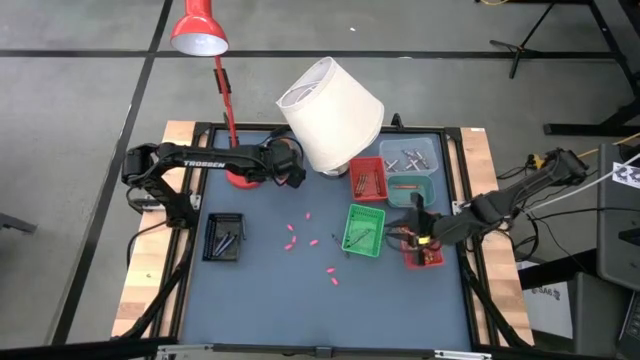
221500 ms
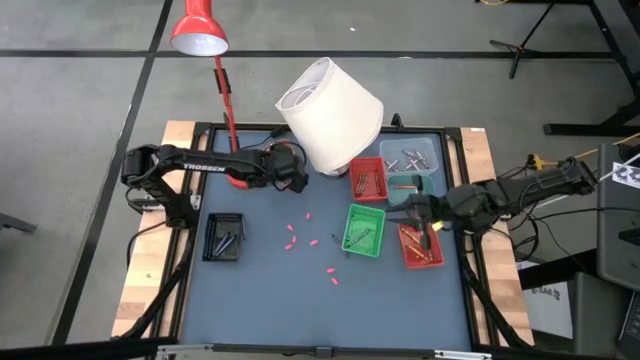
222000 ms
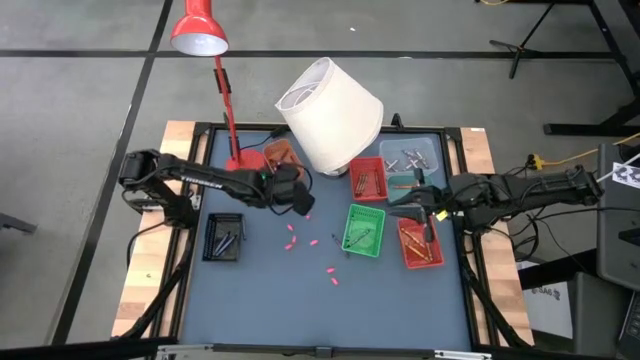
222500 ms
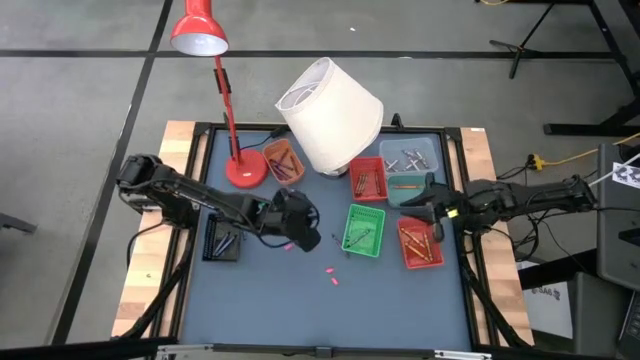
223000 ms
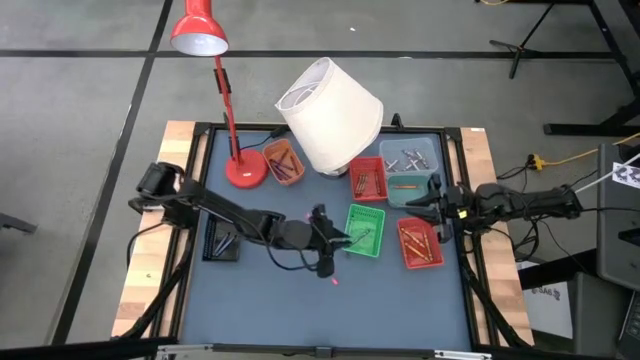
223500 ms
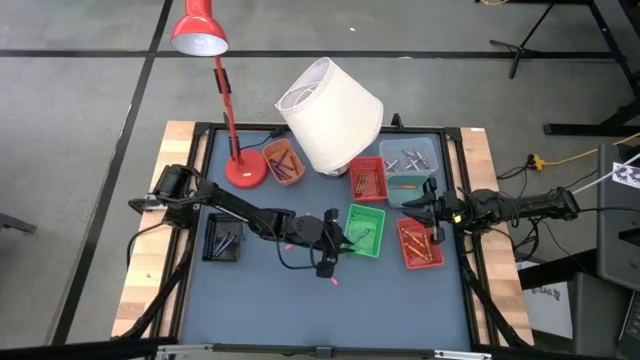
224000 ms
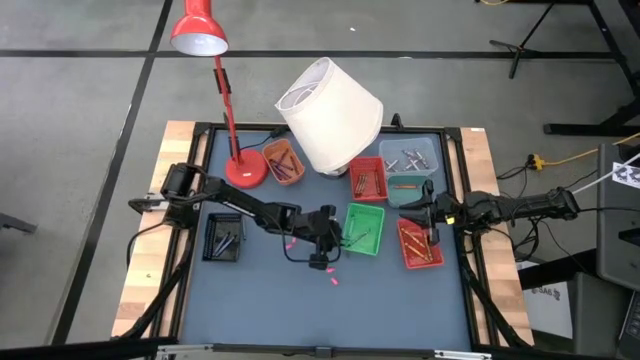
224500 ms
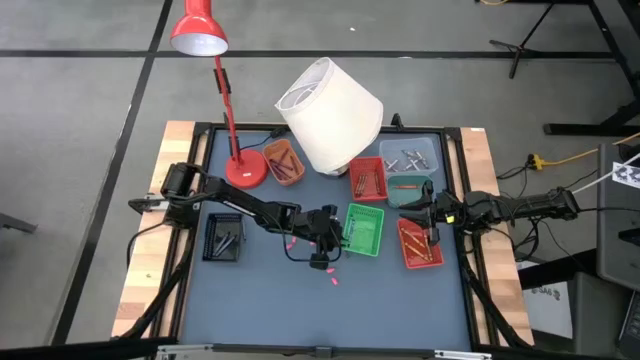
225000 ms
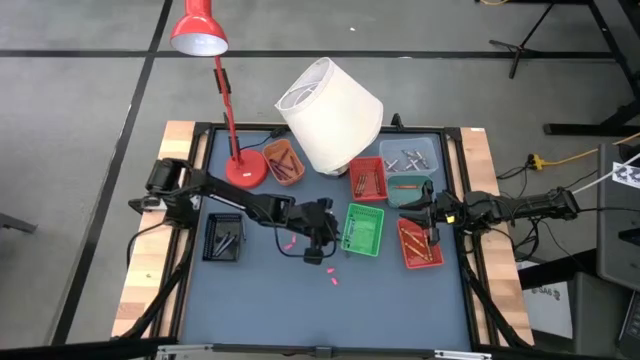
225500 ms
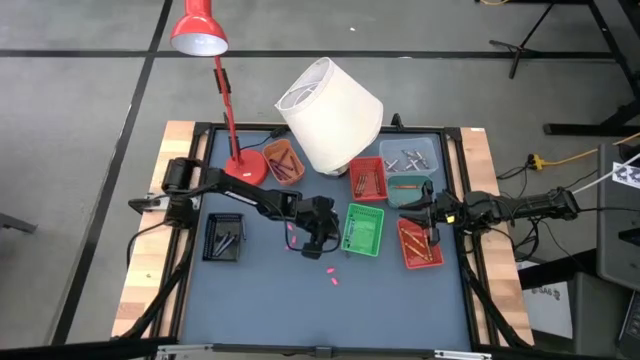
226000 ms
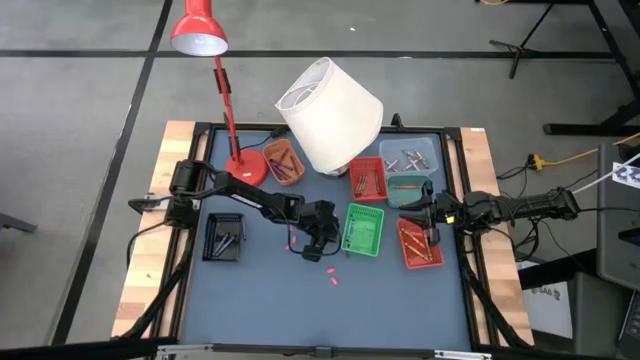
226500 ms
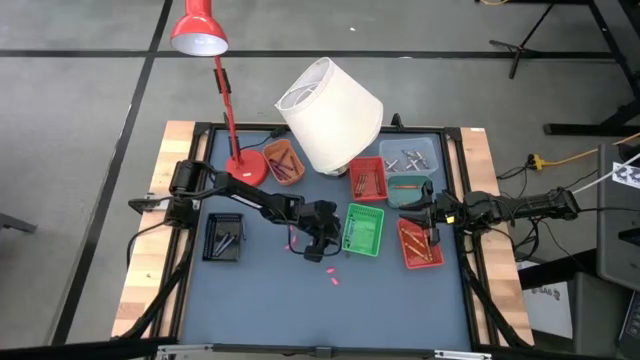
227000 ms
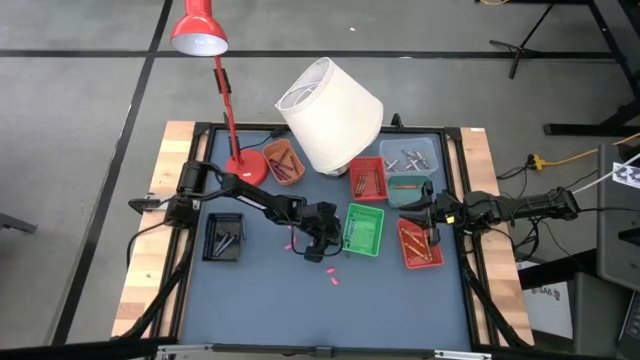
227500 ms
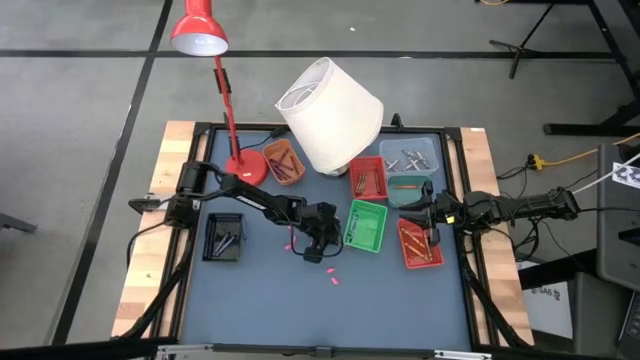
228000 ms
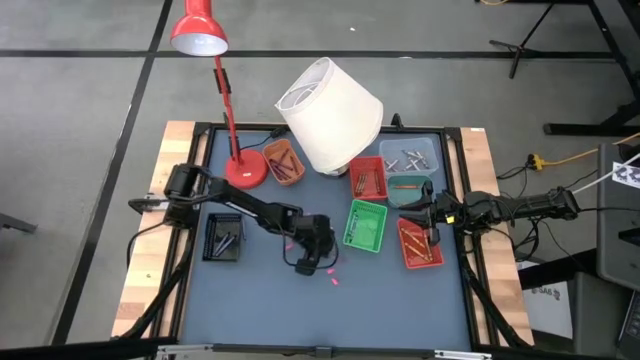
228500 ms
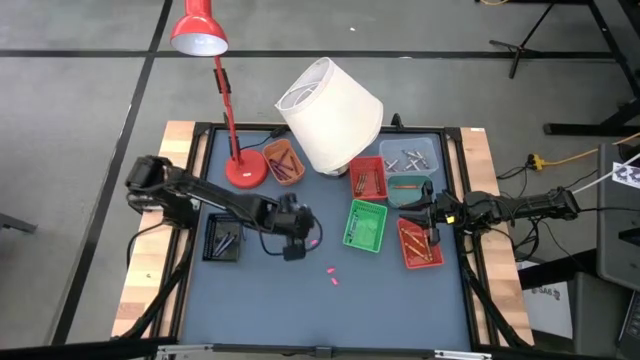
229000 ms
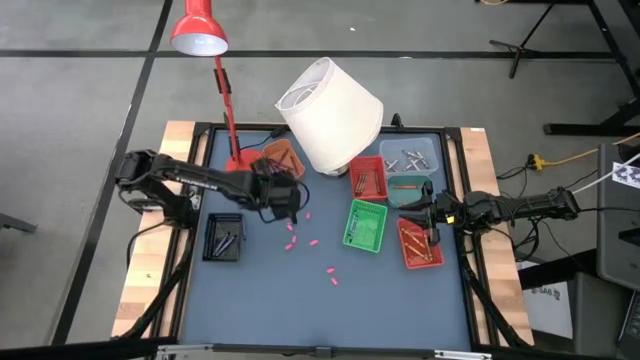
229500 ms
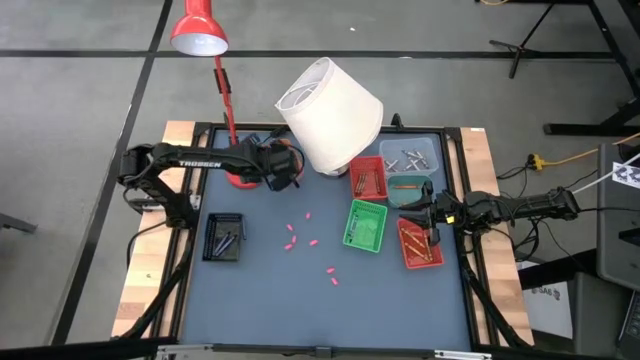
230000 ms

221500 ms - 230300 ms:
Task: Sort crayons
Put the violet crayon into the orange bin

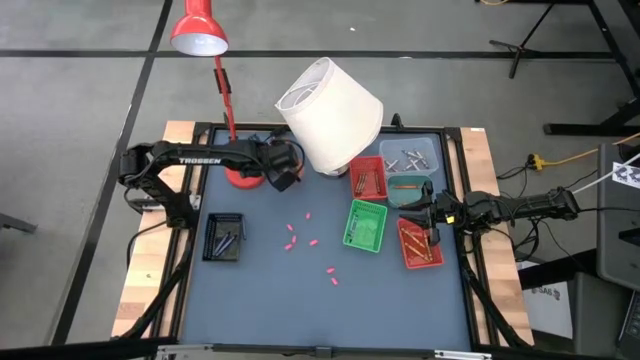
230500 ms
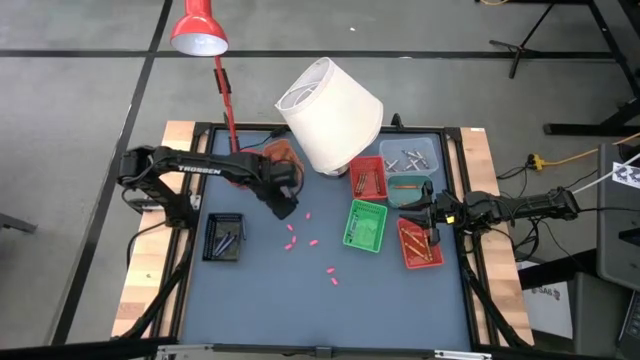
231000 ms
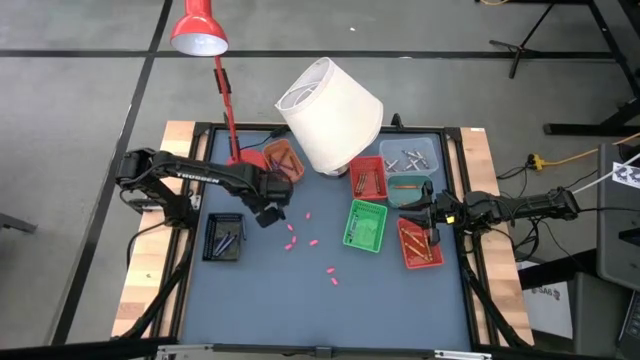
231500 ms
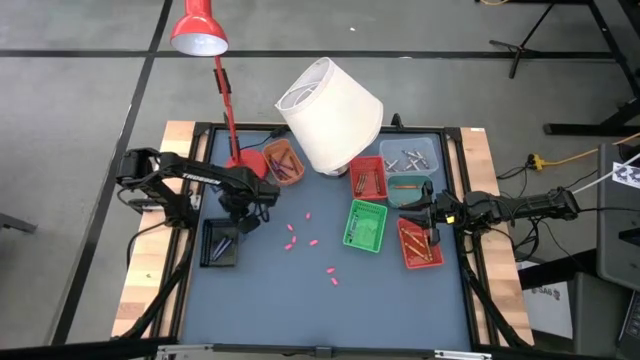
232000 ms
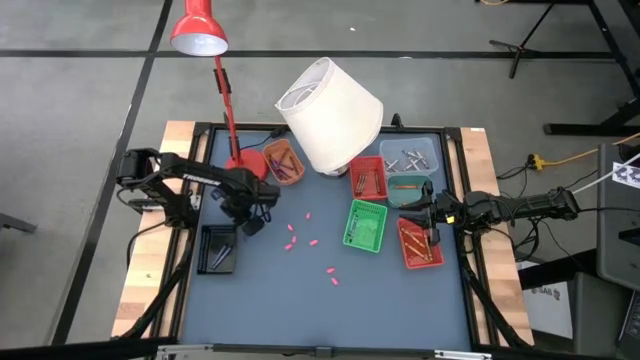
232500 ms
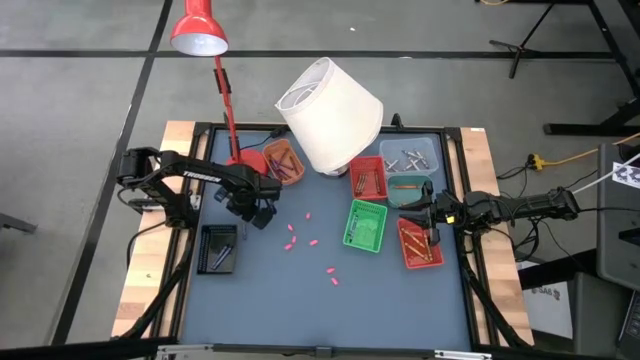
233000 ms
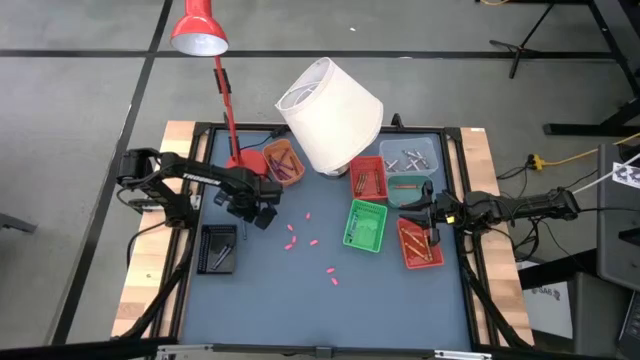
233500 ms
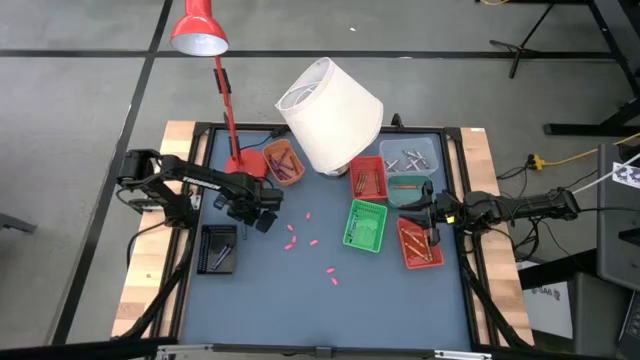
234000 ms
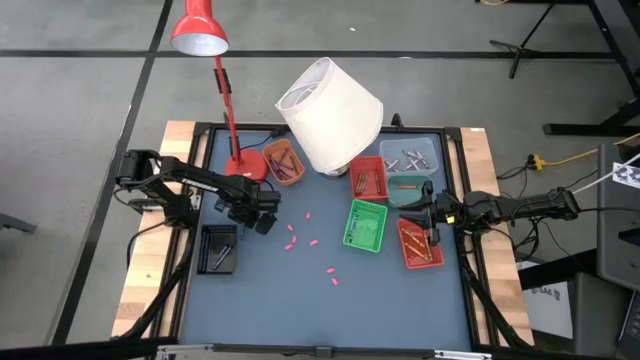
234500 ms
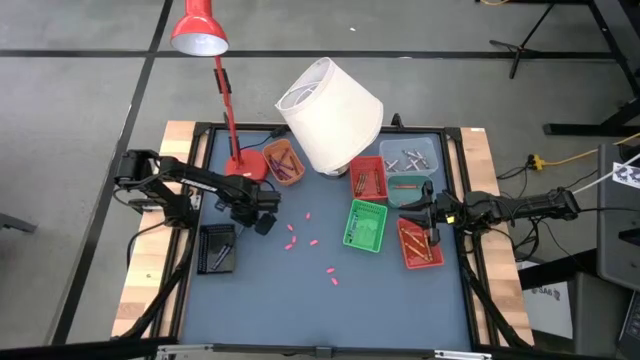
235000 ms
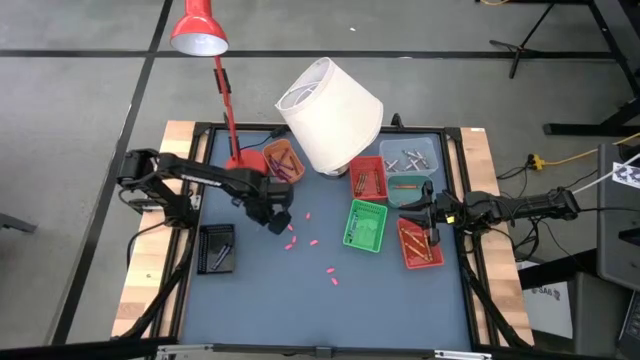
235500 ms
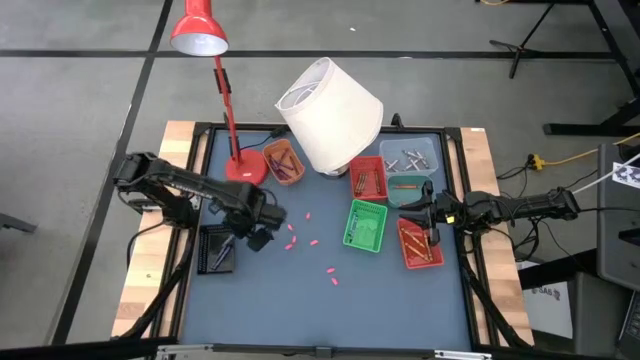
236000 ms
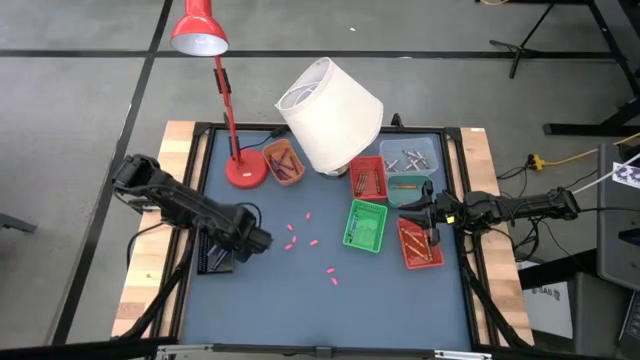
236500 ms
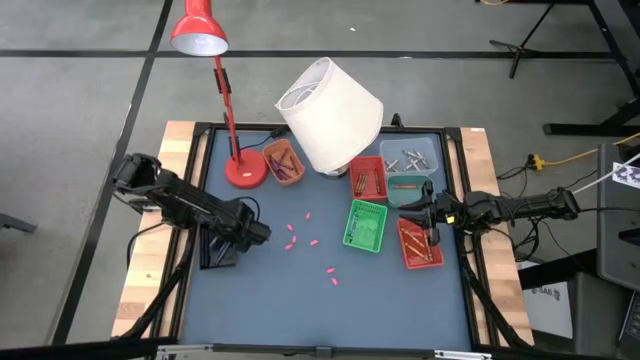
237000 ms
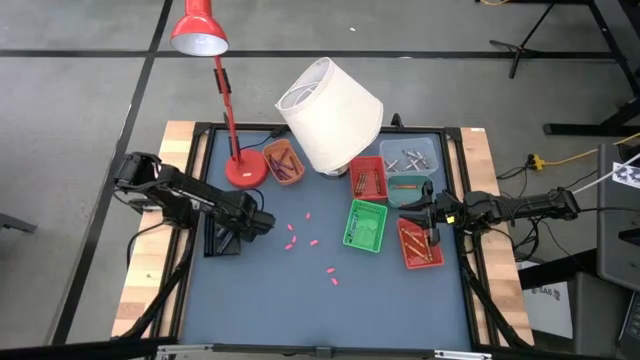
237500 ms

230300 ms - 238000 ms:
Put the blue crayon into the black bin

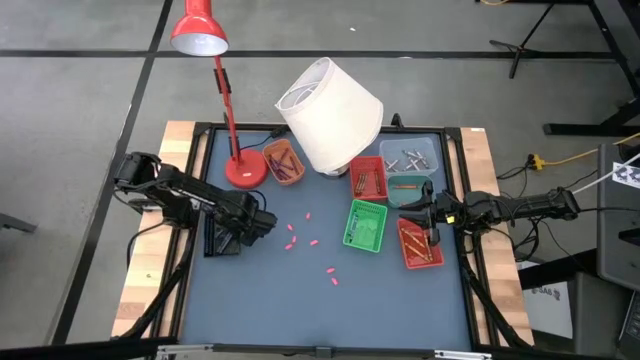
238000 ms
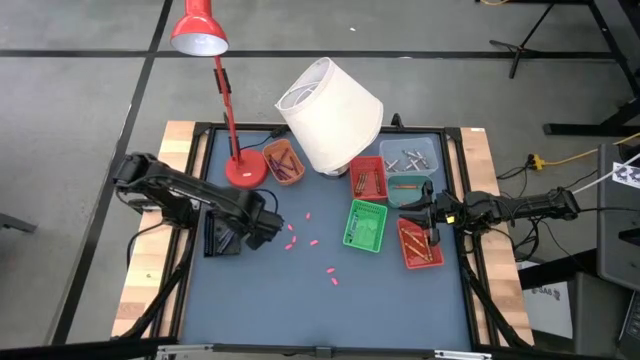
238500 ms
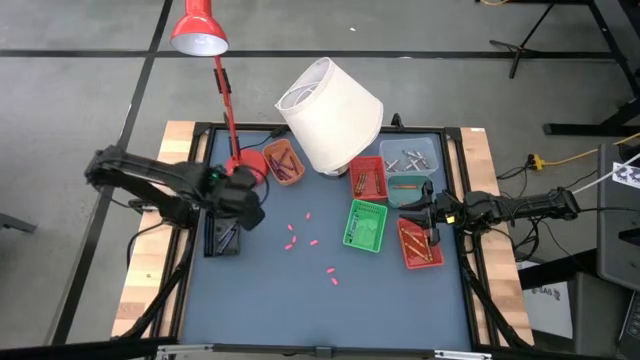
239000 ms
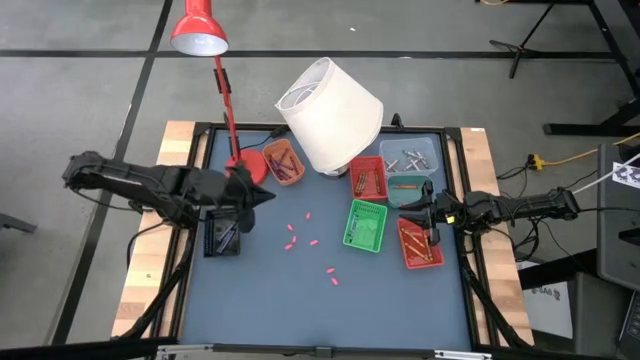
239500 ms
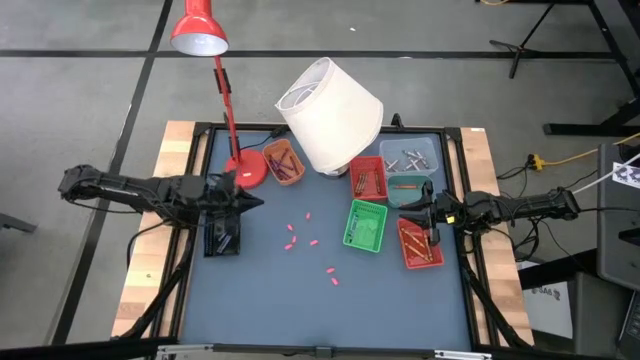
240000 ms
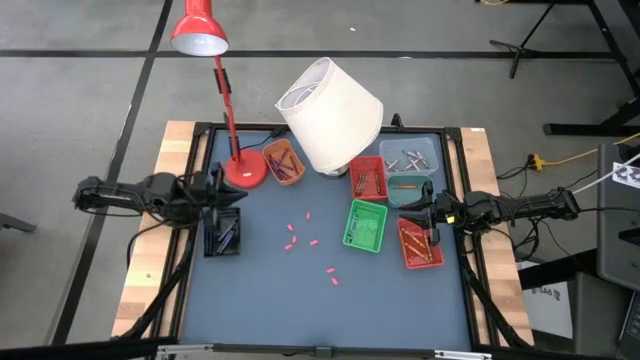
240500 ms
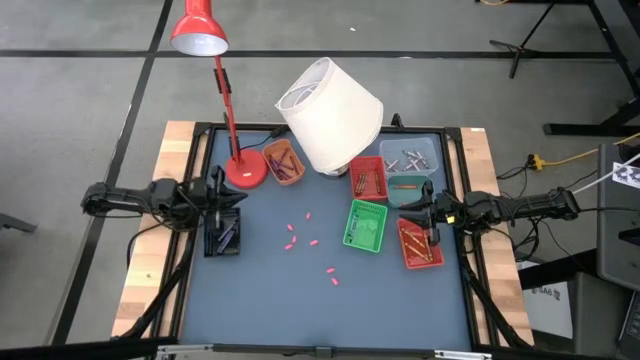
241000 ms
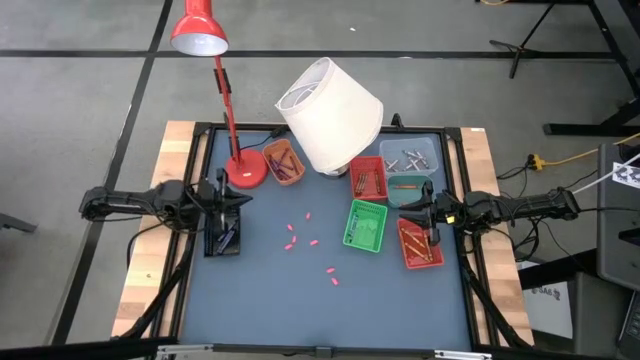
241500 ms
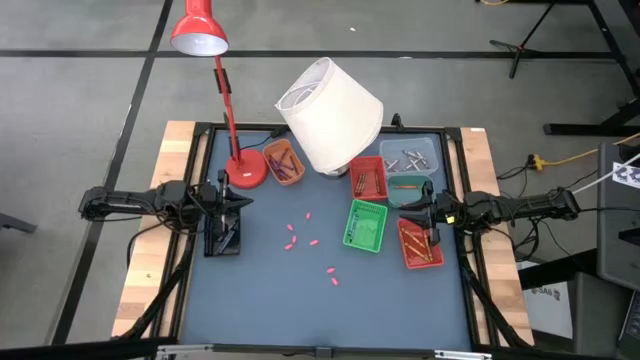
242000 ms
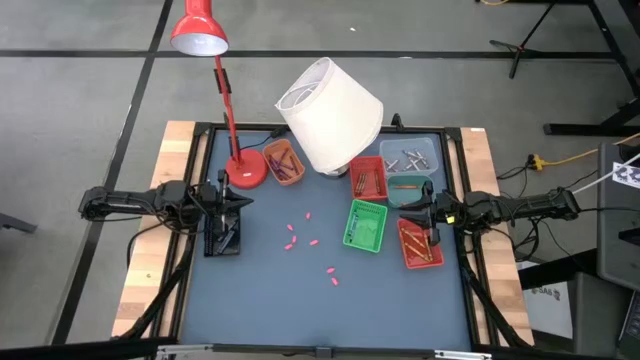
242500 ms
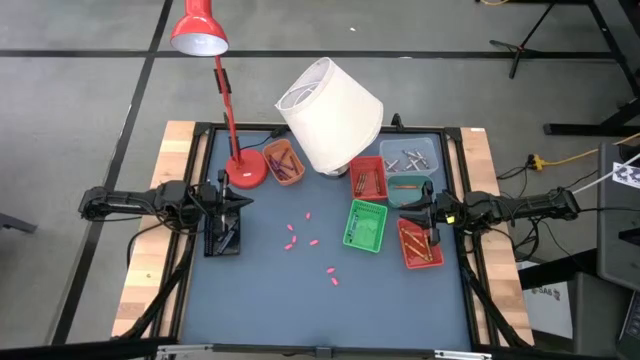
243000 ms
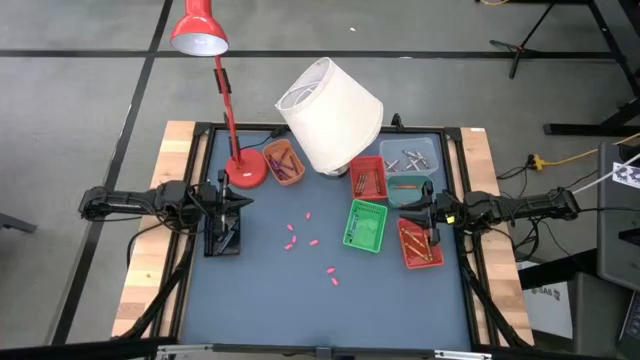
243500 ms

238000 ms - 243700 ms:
Return to Home Position
